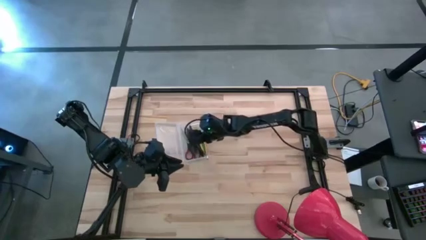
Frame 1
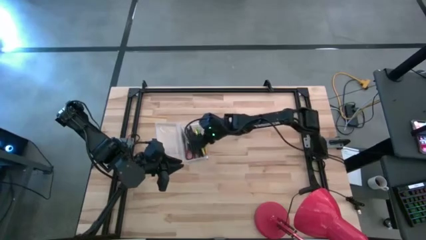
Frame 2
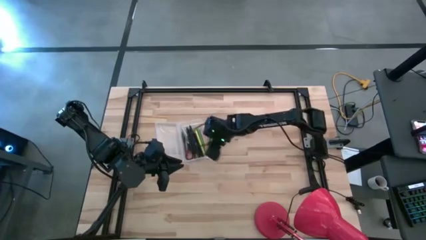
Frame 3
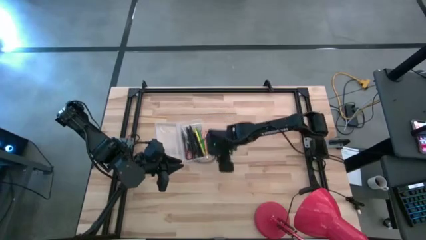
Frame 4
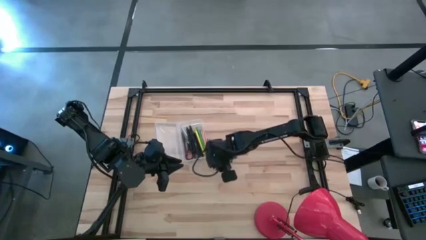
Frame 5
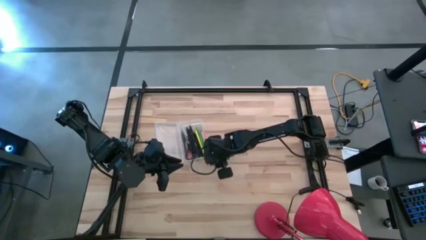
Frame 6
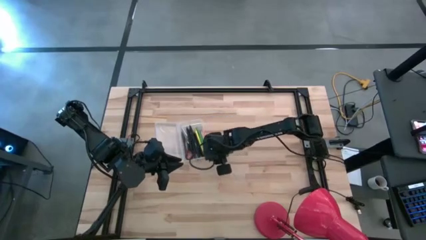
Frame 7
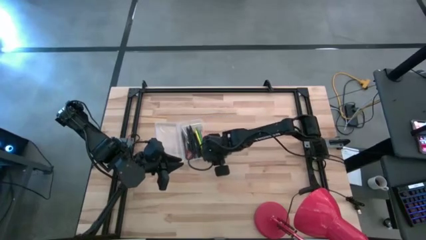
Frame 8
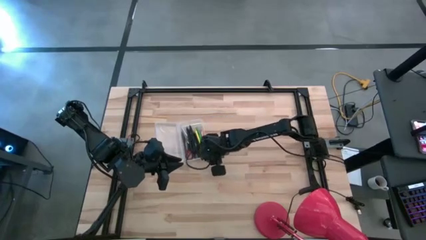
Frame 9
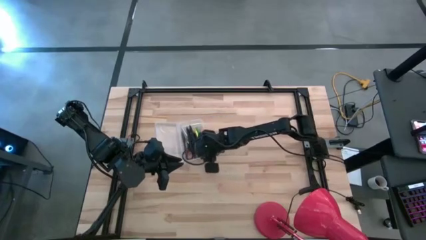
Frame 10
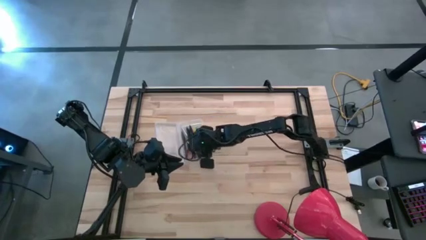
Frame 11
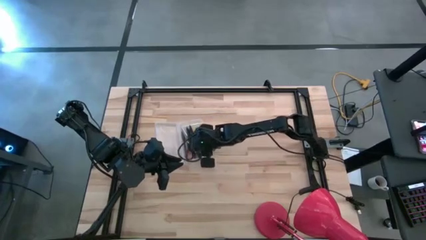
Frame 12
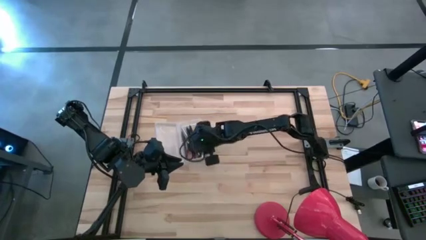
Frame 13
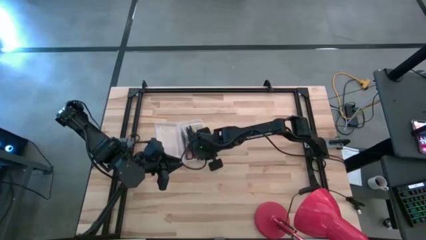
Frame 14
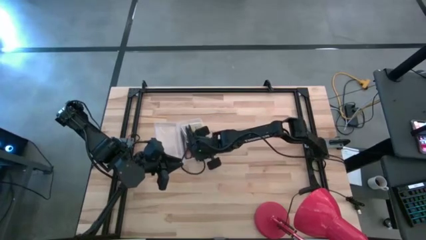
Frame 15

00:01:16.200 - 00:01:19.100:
Task: Pick & place school supplies into a supply box
Adjust the orange pencil in the transparent supply box

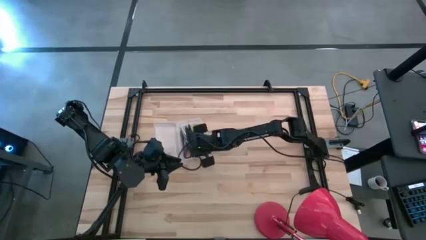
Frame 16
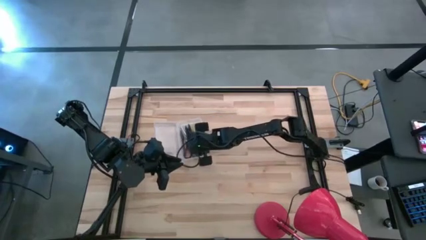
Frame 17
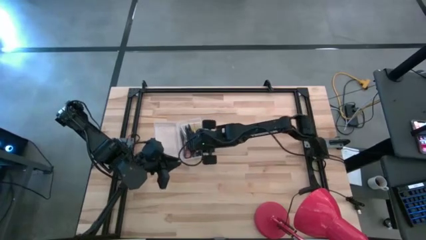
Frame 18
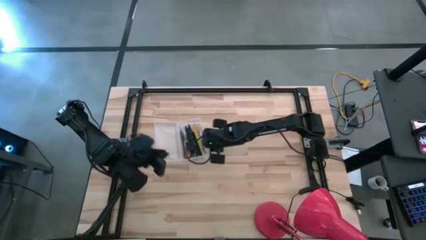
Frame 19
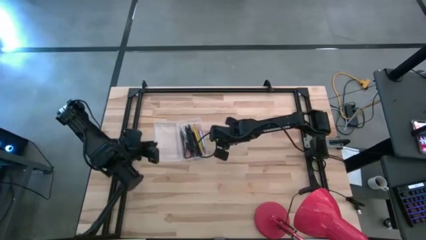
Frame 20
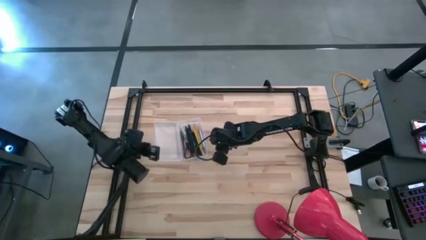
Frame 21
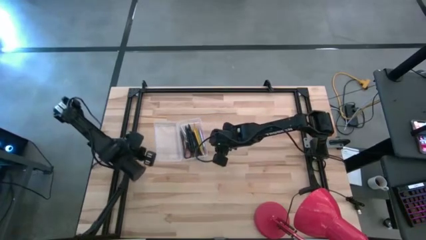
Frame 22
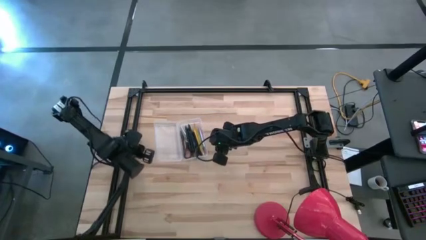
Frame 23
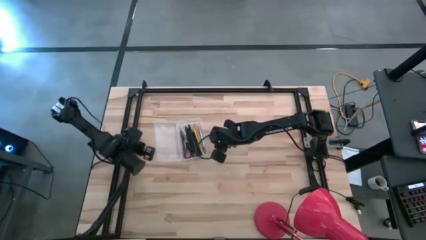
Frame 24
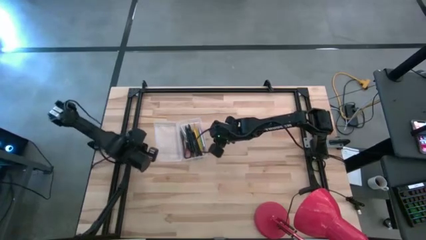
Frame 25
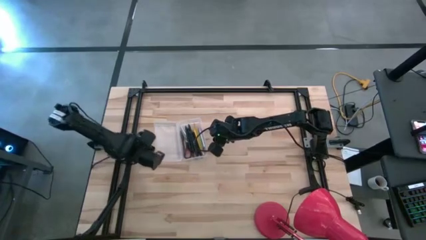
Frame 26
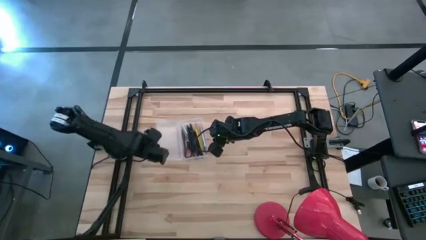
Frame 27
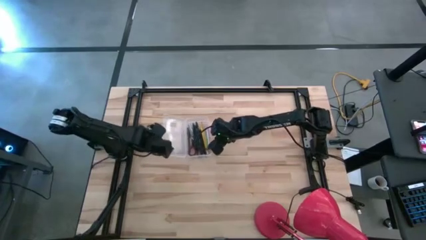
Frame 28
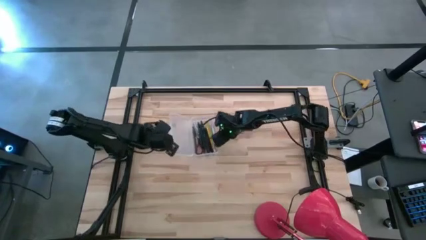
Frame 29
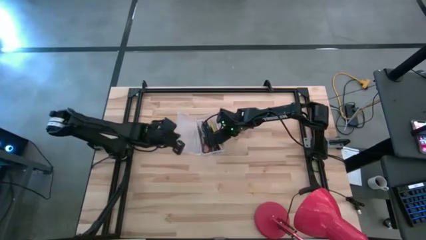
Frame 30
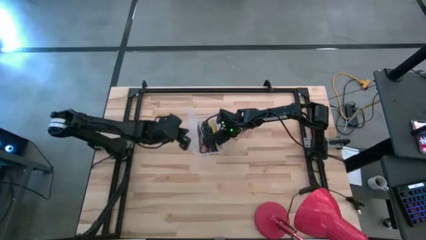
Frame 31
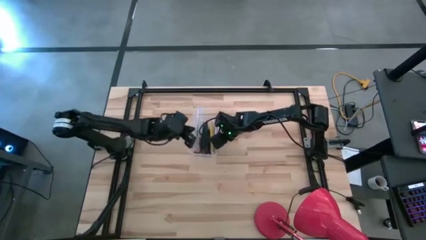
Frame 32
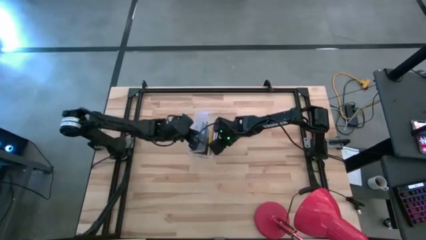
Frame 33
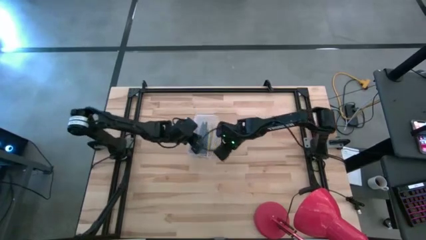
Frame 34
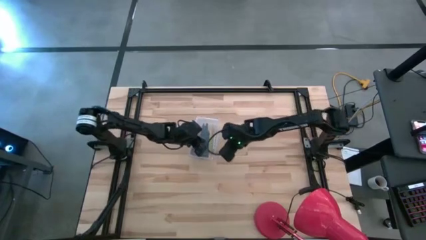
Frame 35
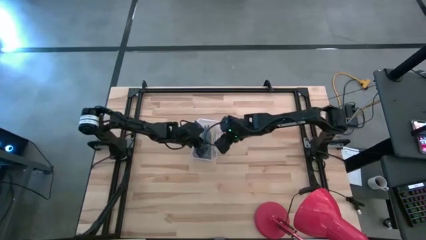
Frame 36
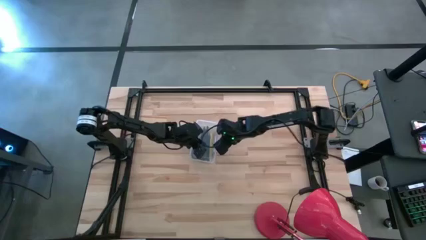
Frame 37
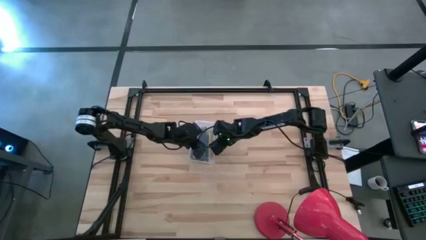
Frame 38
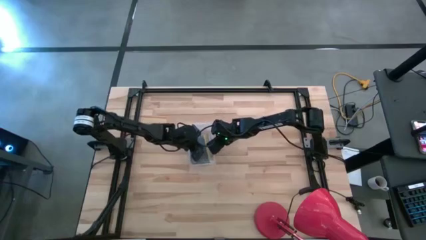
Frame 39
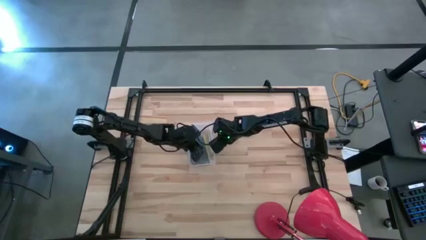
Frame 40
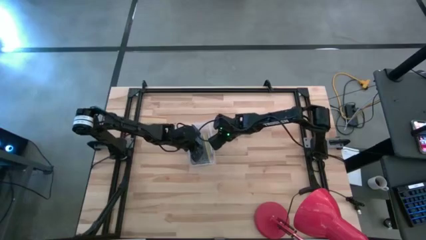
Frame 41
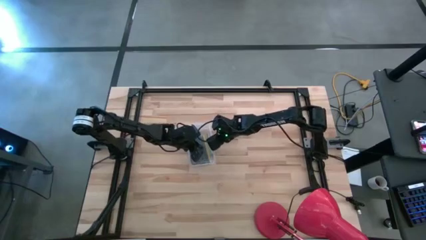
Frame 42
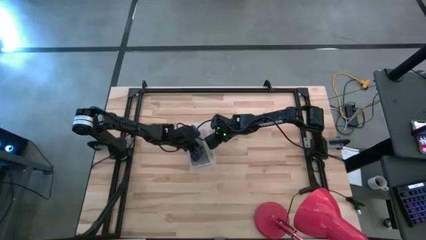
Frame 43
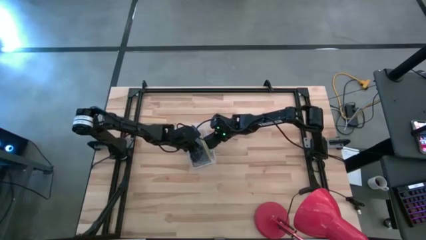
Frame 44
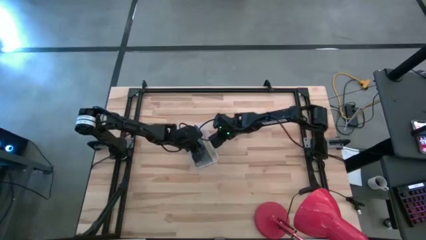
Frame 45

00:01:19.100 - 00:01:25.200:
Close the transparent supply box

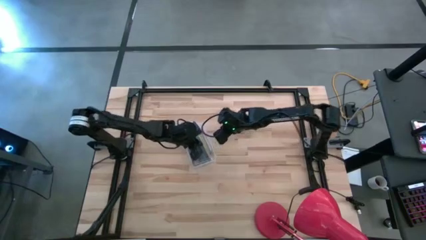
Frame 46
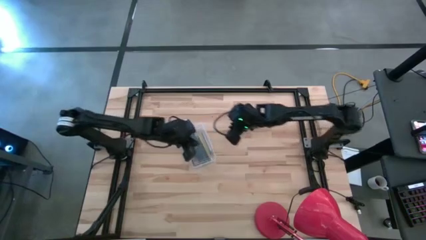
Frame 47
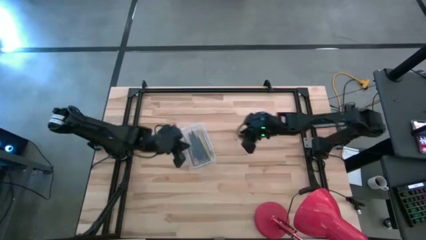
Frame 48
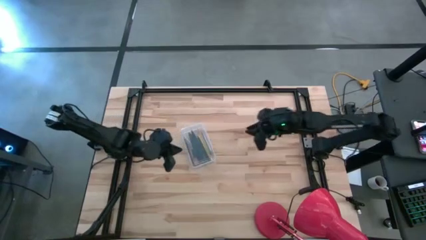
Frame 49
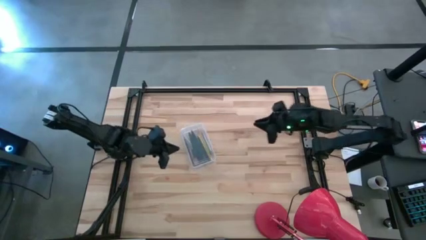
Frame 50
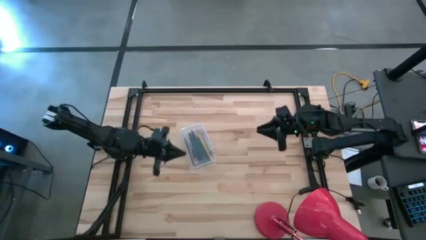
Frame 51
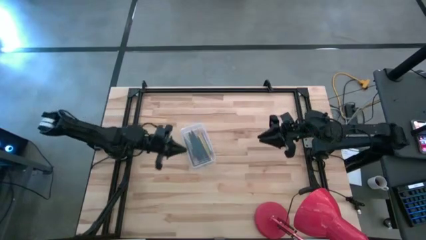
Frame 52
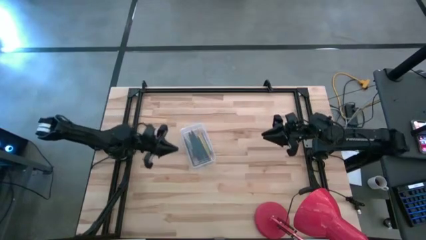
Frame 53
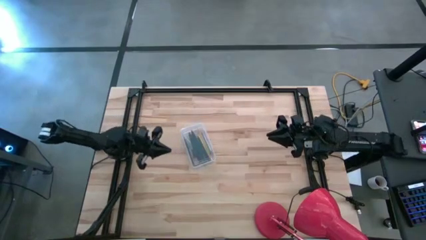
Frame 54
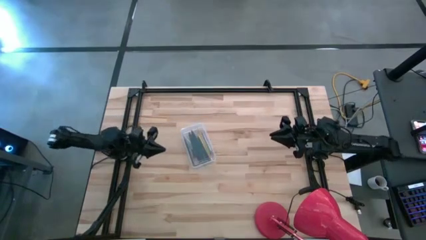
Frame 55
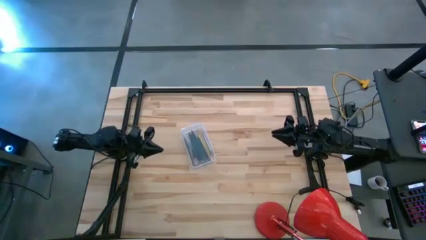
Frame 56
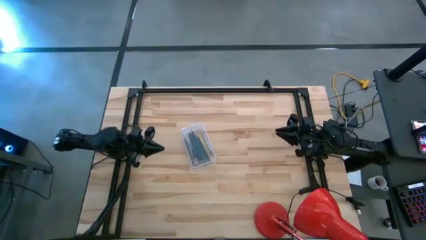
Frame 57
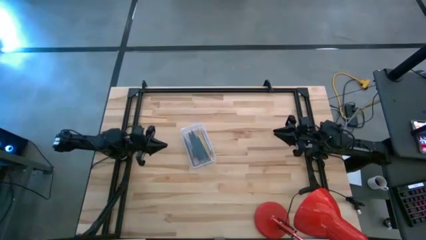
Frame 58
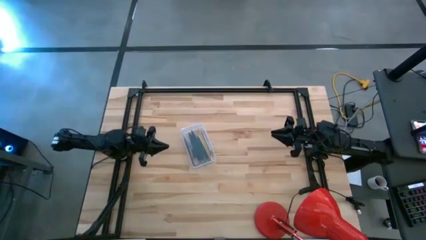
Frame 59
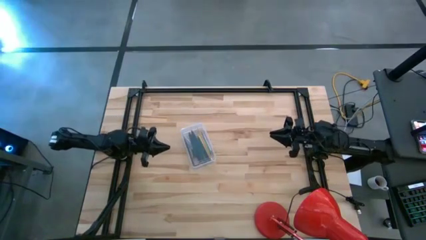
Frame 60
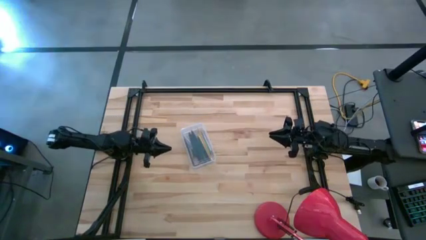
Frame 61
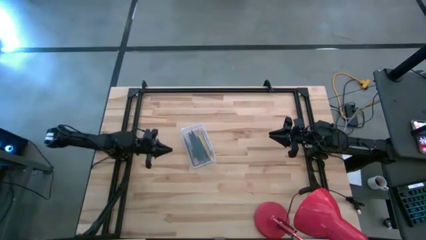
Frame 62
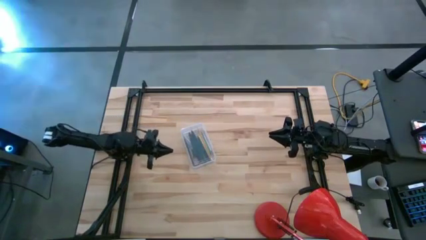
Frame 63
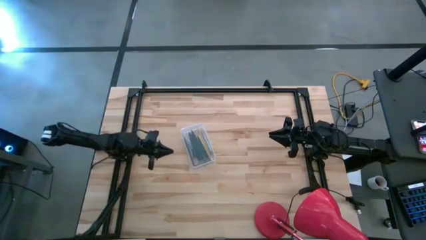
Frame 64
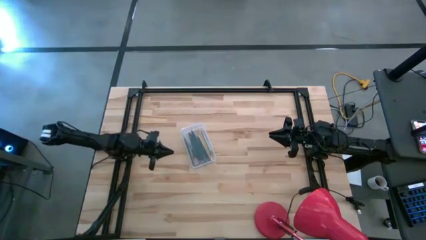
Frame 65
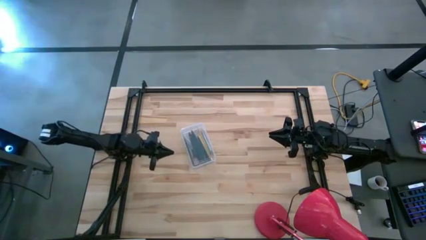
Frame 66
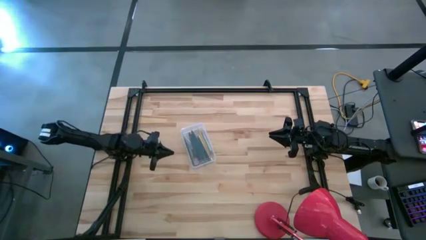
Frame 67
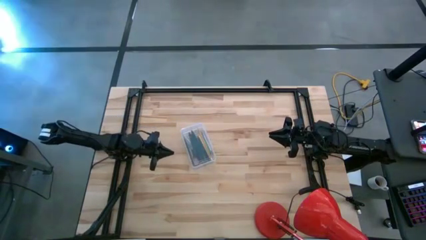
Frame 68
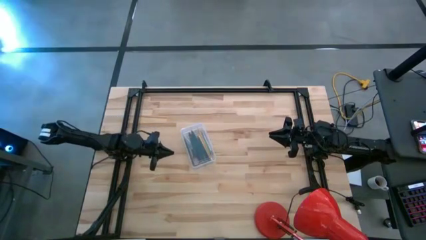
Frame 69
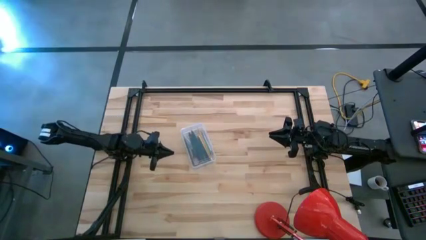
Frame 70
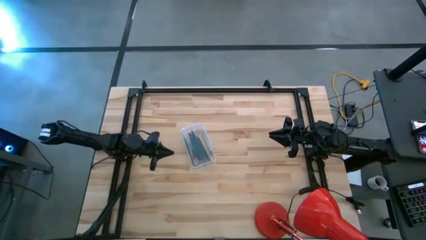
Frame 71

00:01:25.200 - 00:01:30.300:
Return to Home Position

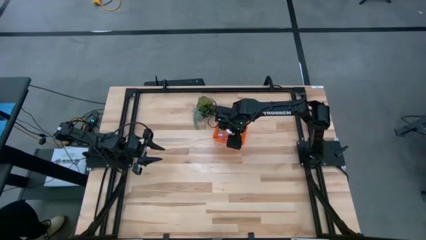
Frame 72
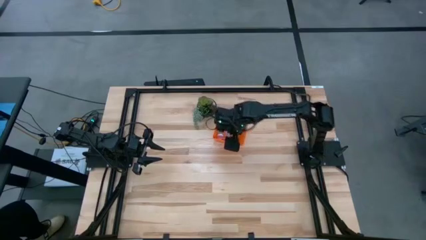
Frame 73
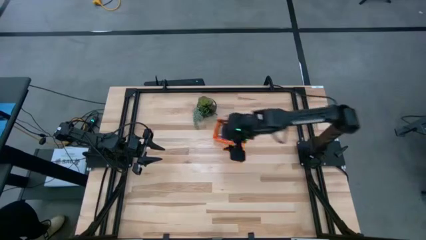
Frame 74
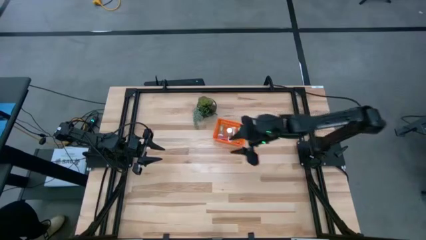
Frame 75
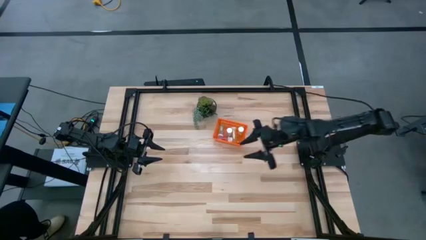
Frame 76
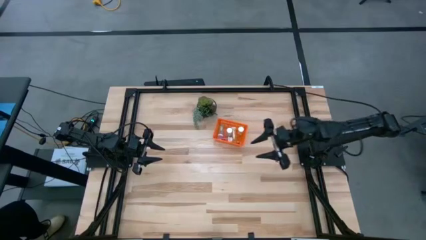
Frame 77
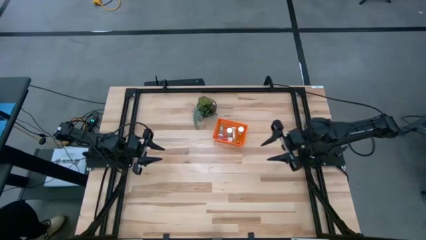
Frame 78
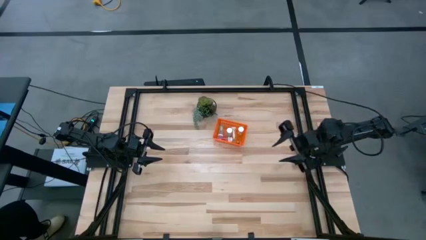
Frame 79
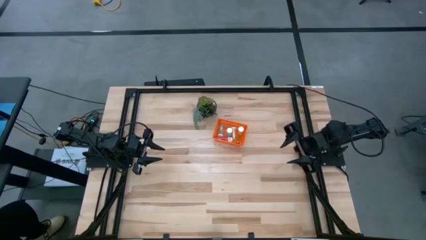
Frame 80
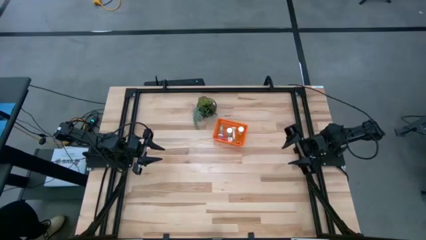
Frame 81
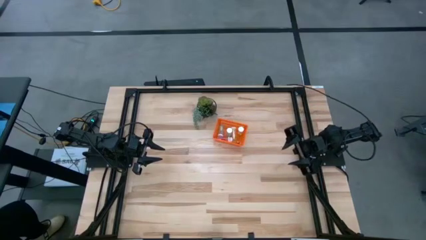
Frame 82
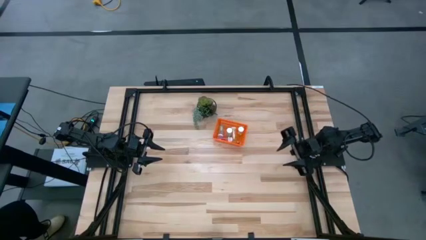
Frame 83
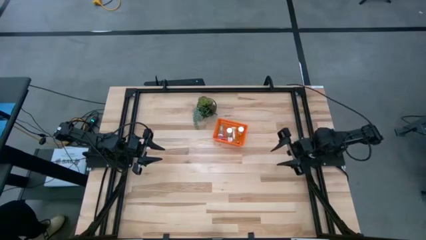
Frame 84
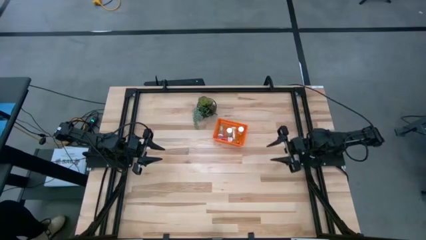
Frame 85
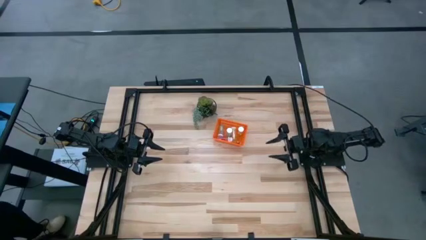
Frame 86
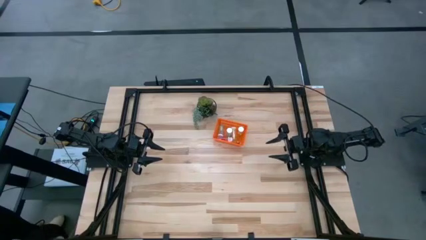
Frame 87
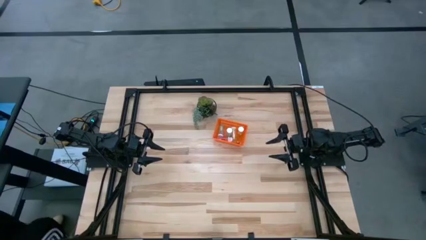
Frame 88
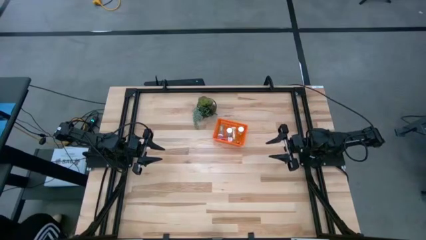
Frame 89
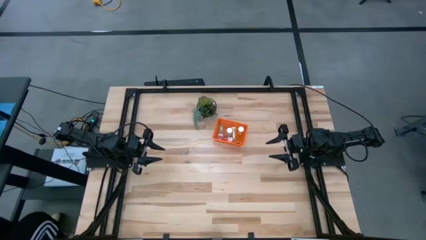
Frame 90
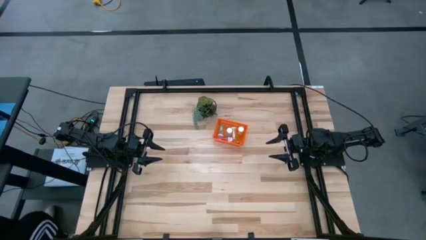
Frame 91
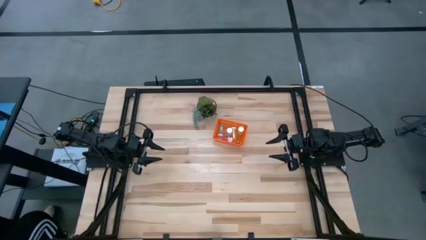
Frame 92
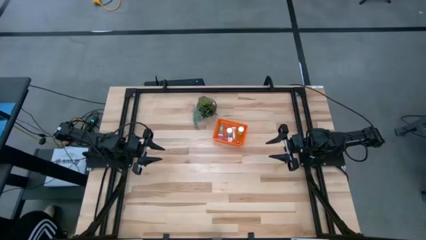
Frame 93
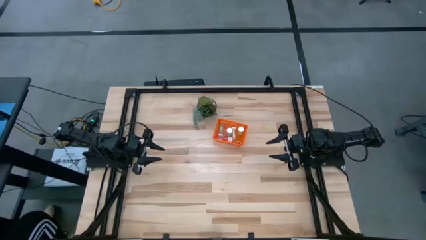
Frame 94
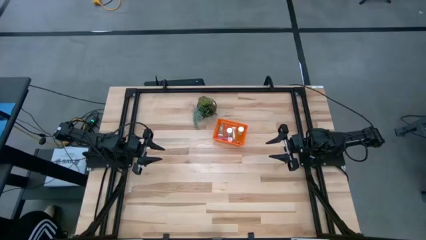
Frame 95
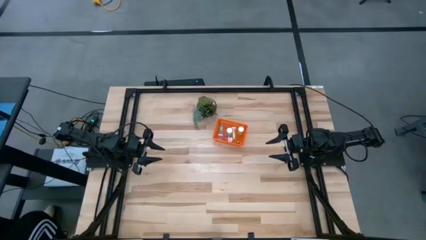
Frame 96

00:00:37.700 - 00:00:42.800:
Task: Pick and place pill bottles into a basket
Return to Home Position
